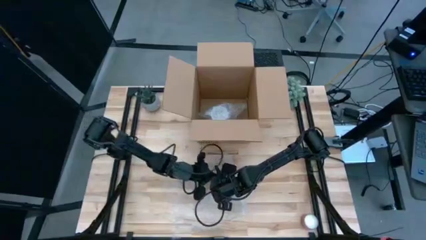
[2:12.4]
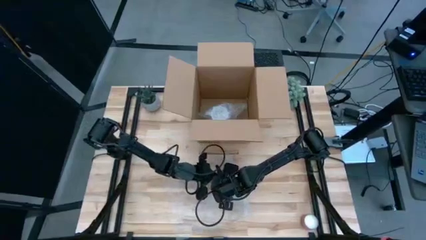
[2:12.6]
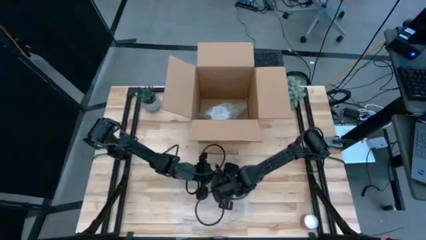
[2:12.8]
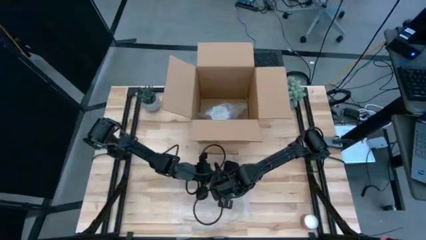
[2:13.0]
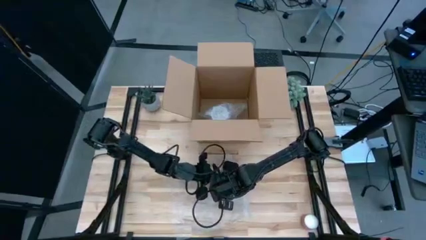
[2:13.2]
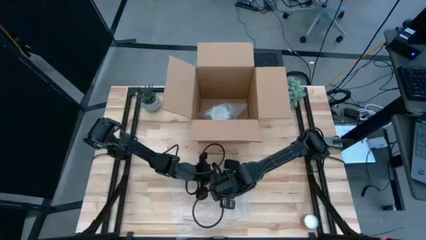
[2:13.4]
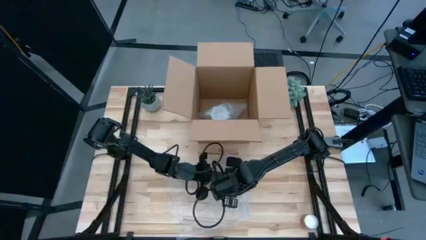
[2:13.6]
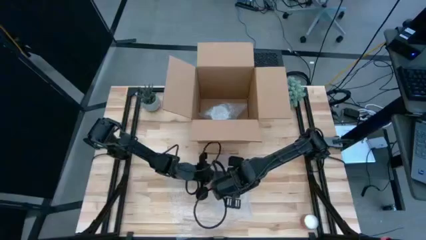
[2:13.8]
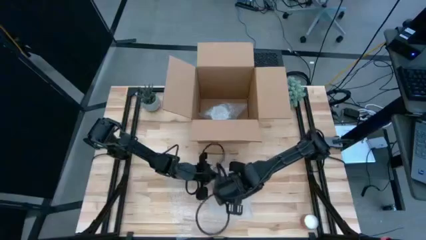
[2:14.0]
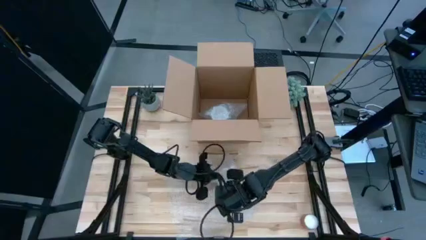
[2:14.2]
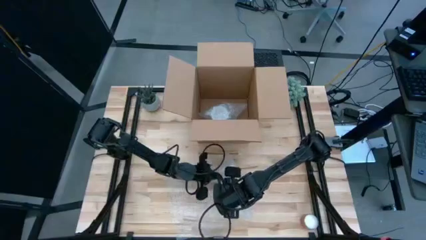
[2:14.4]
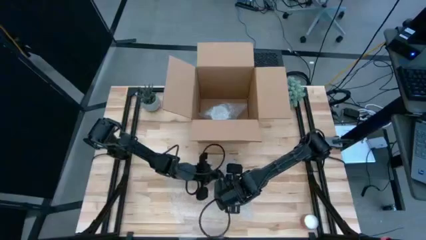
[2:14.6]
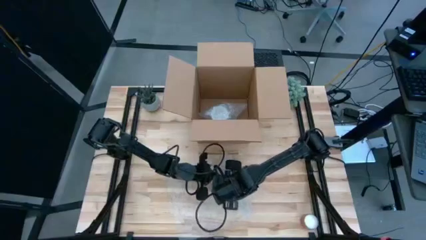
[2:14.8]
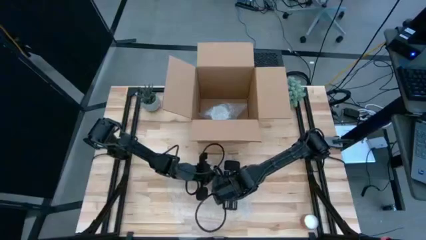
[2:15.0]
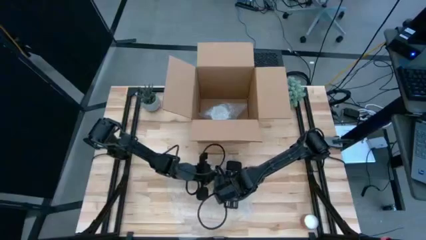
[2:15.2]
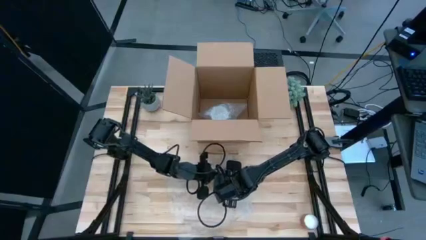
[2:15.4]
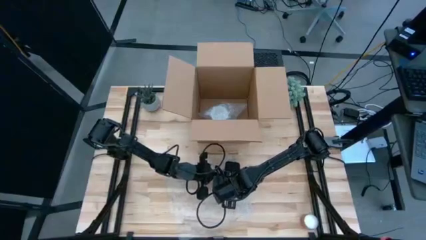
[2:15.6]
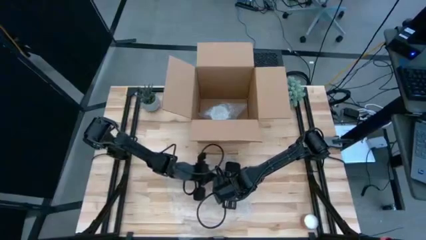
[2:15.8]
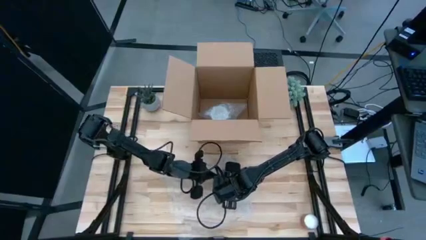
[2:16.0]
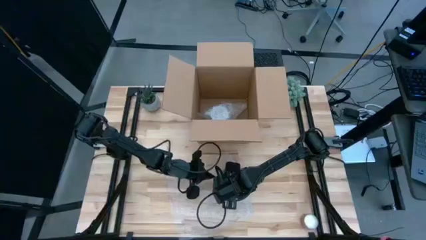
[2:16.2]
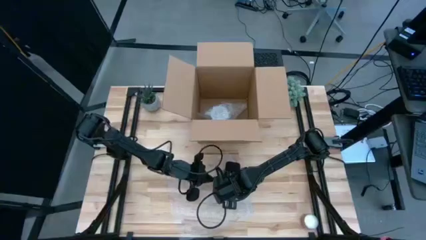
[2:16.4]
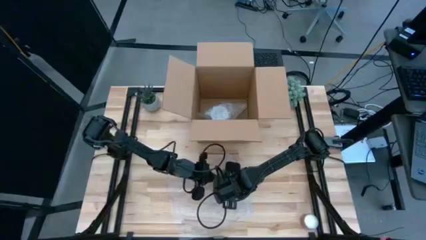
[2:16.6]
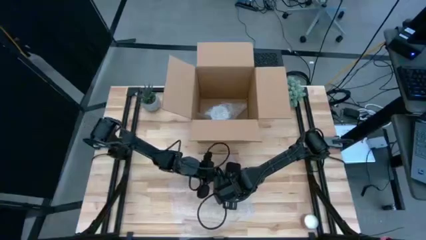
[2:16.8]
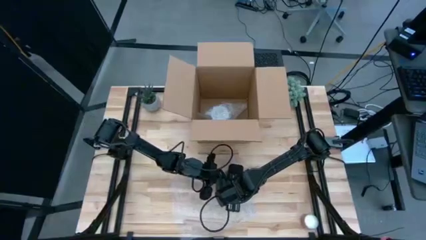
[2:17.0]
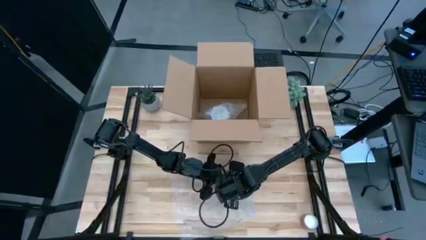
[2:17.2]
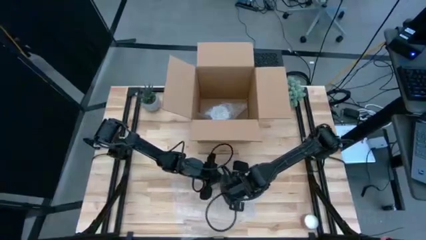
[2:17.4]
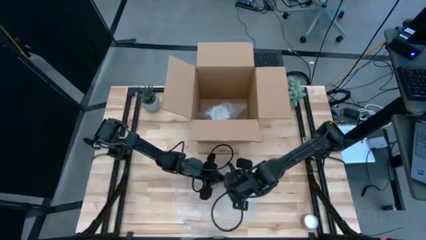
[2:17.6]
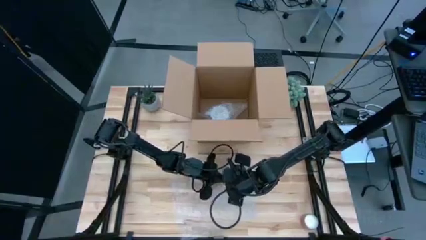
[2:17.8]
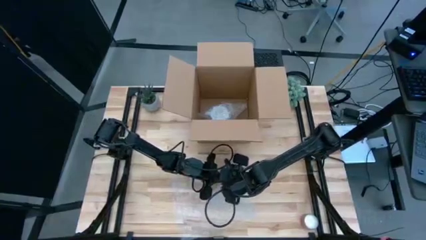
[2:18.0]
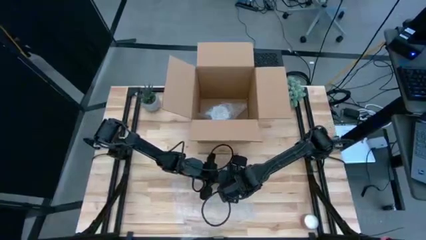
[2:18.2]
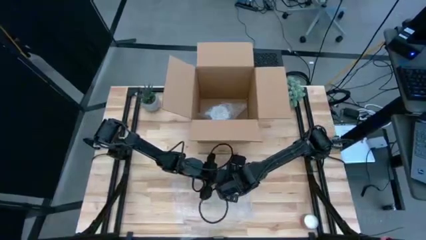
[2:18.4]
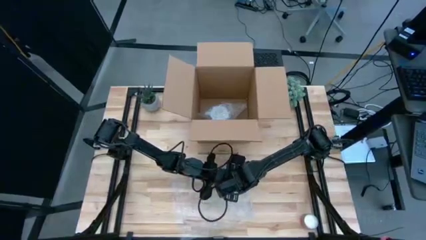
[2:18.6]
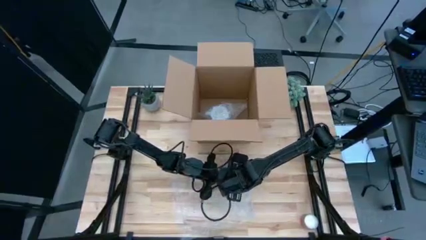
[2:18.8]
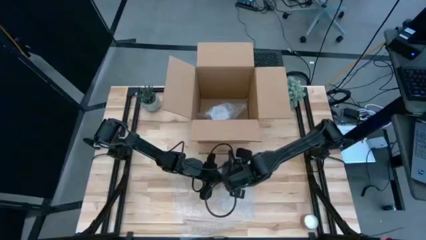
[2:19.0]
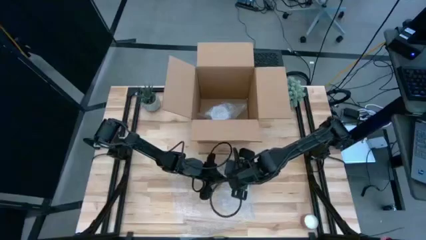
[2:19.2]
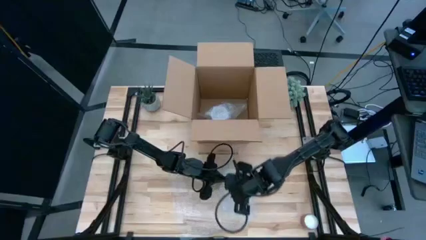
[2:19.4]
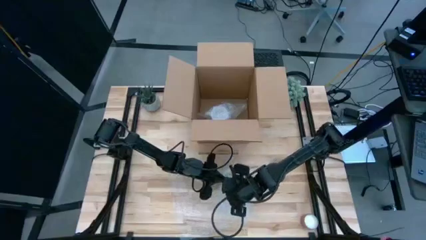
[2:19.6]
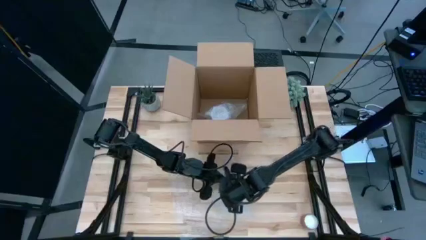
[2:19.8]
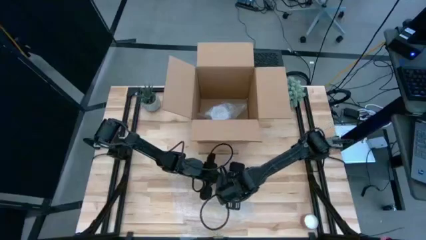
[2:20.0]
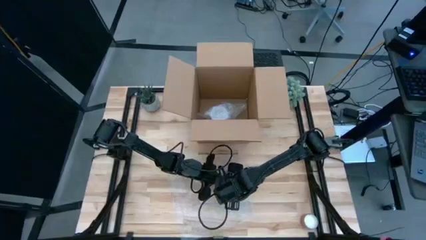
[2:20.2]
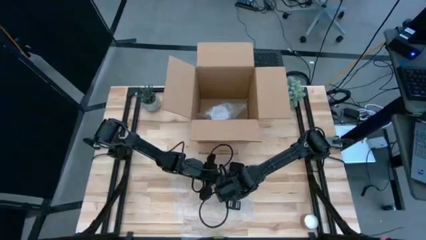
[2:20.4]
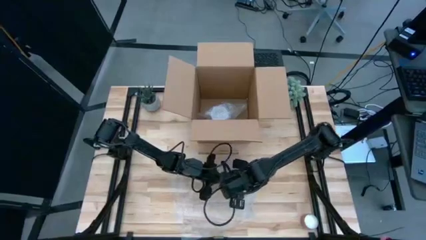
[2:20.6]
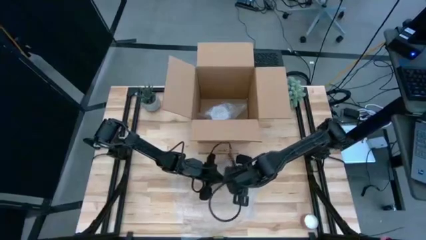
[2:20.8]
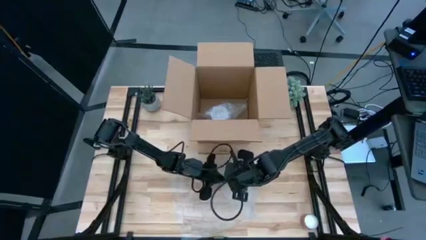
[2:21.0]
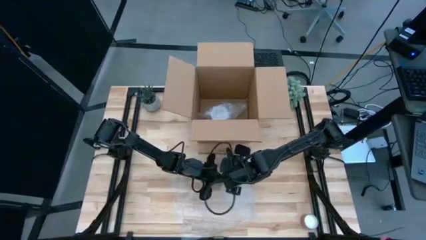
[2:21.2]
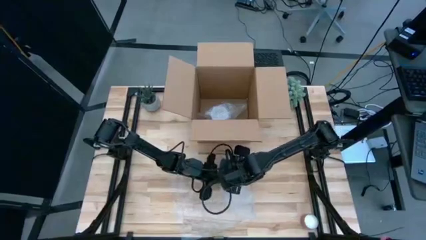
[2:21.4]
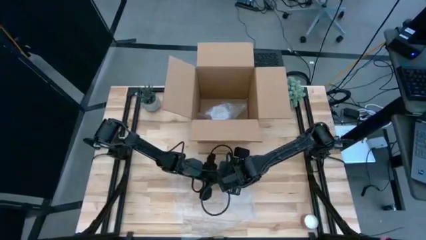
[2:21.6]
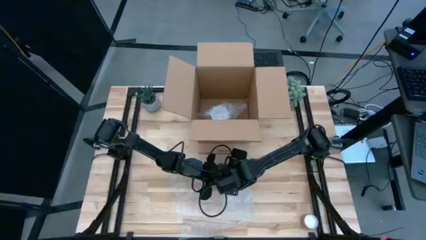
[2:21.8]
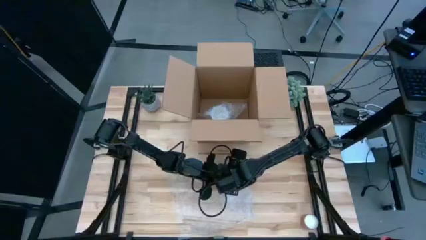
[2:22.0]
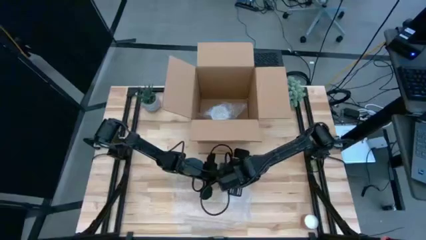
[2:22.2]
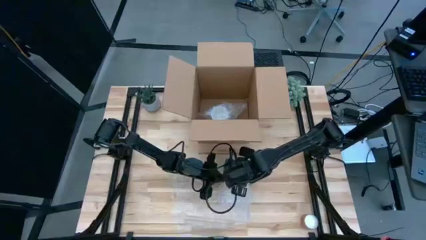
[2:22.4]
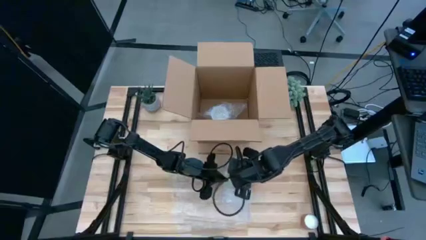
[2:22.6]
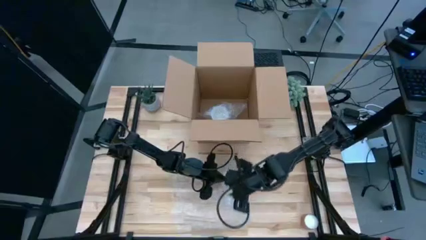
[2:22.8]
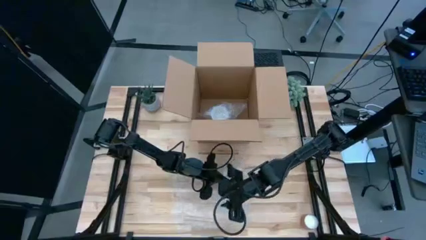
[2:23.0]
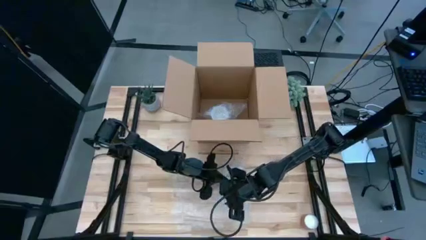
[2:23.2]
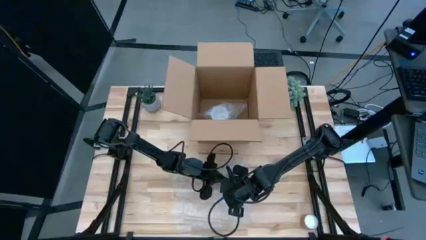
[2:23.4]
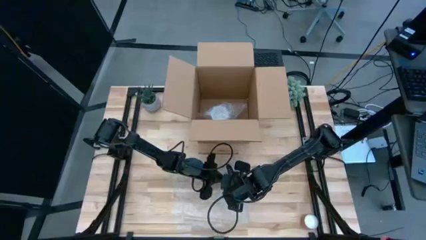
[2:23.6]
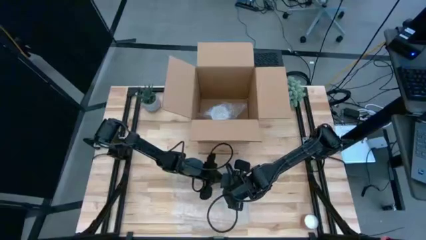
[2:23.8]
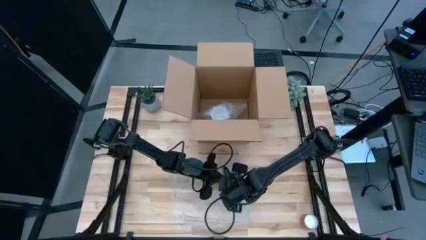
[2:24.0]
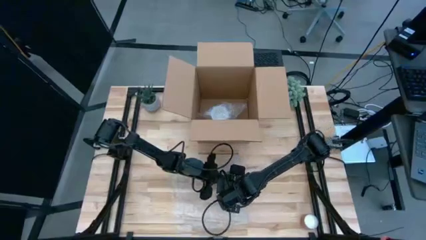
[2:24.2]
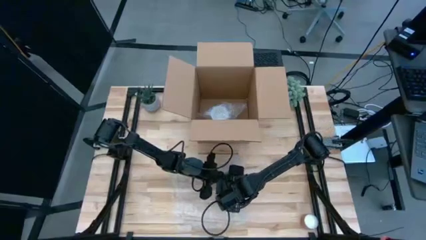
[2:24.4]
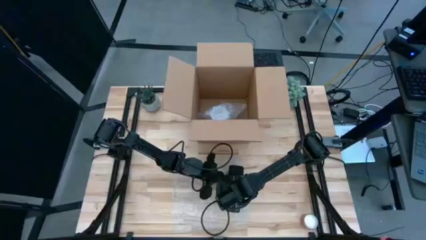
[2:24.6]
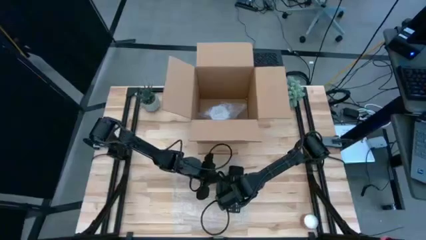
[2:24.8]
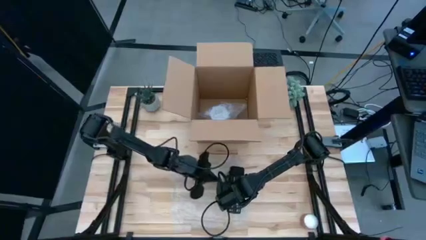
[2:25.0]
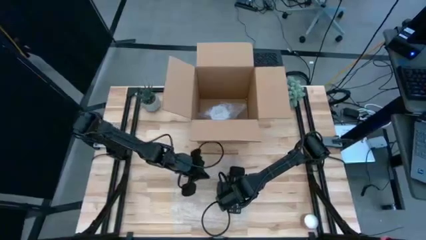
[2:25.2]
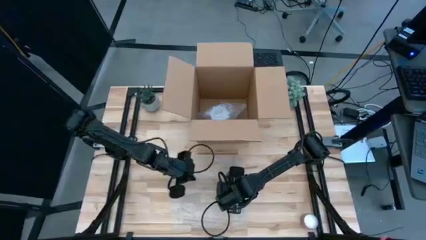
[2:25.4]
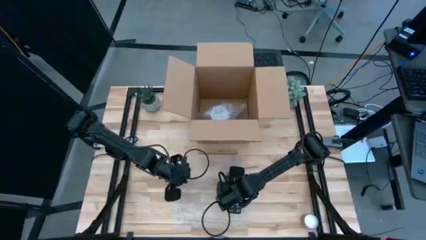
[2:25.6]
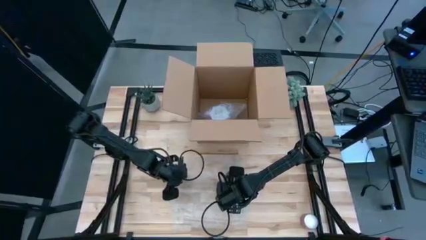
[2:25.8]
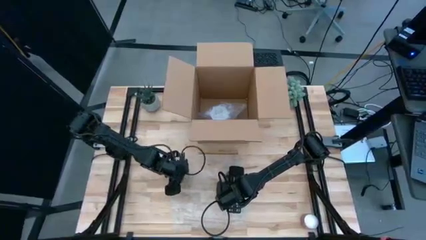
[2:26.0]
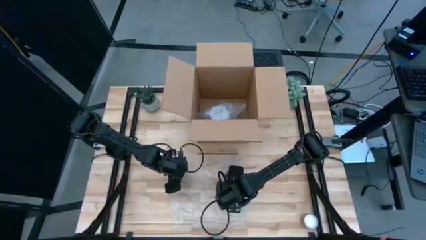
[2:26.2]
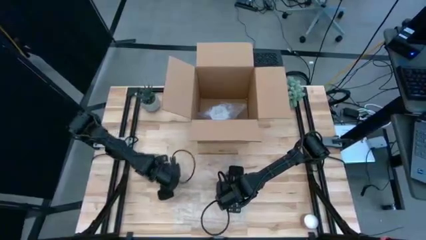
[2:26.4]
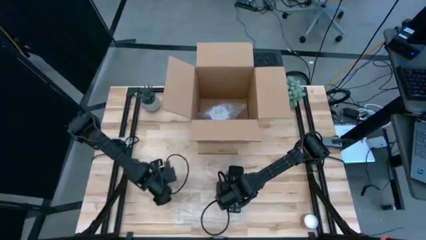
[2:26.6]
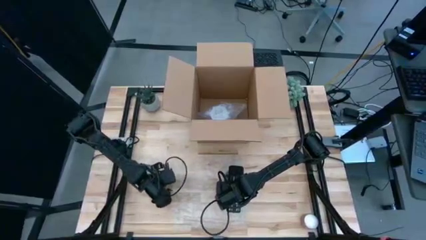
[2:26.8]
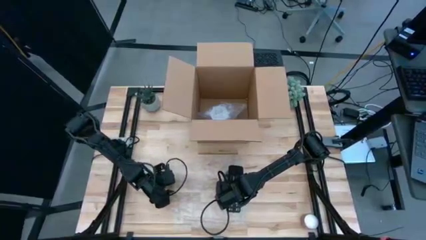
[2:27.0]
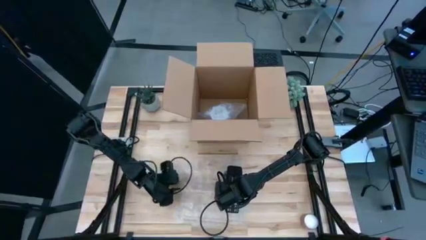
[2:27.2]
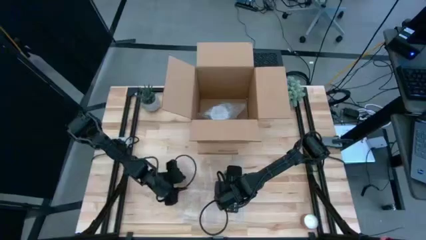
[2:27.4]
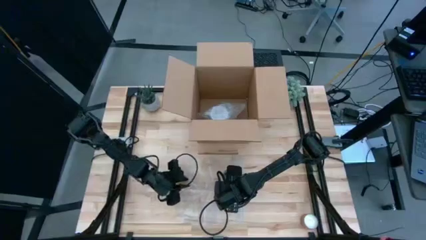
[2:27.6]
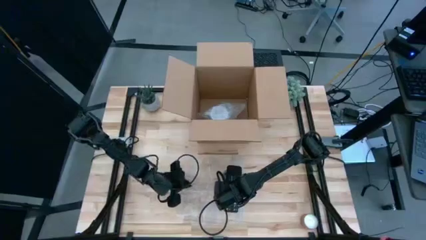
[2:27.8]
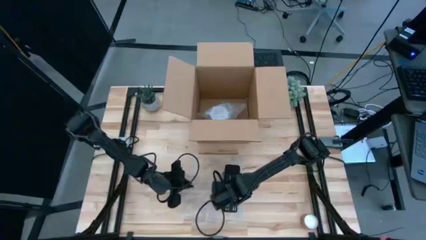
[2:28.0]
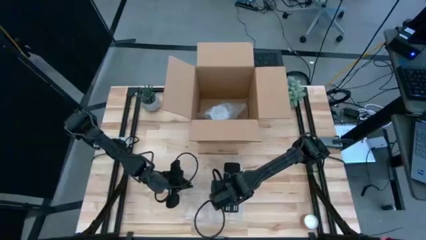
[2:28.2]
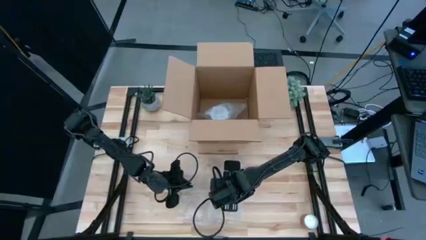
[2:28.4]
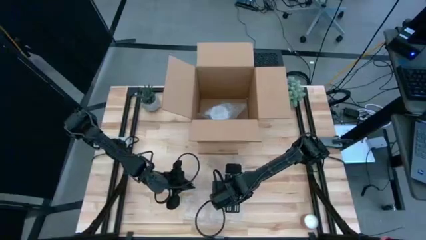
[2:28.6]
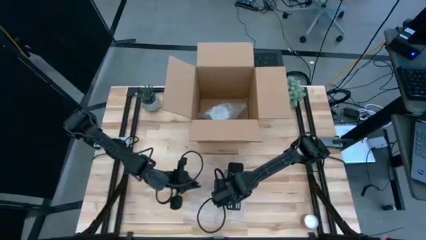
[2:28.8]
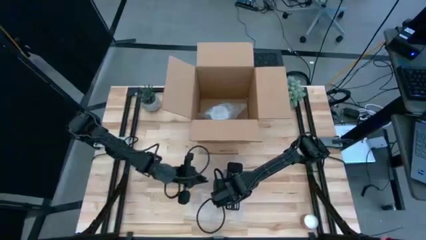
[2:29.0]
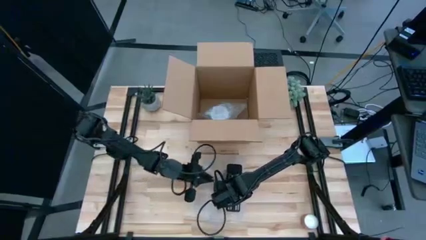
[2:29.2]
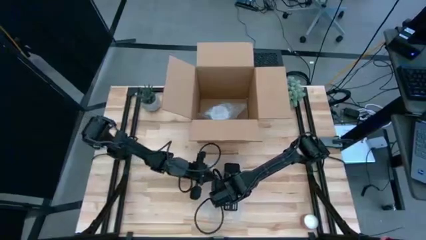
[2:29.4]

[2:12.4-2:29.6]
Task: wrap mug
Wrap the orange mug with the bubble wrap
